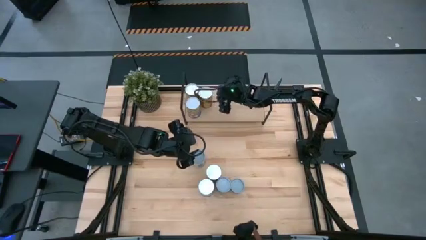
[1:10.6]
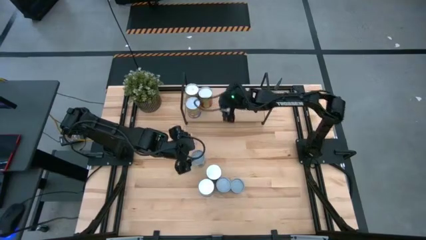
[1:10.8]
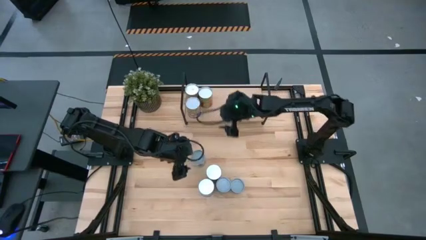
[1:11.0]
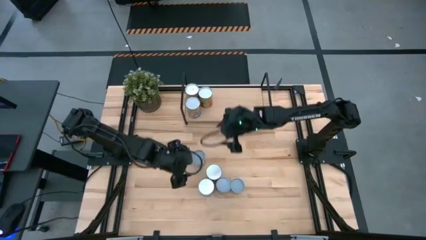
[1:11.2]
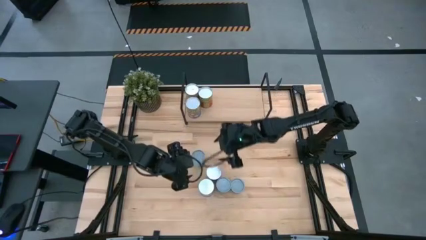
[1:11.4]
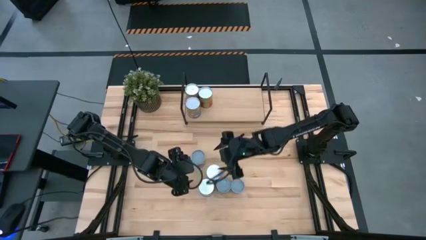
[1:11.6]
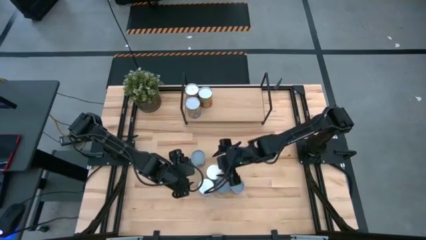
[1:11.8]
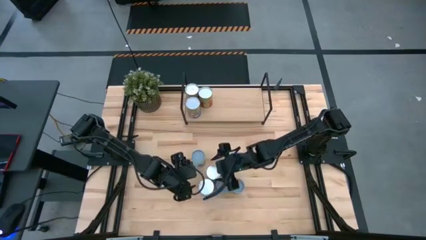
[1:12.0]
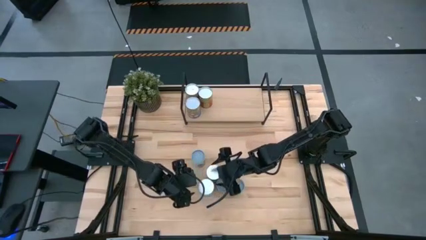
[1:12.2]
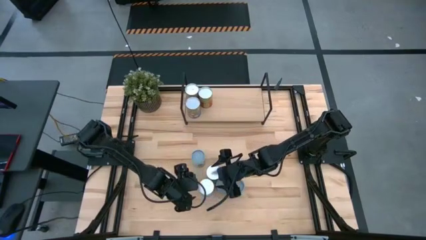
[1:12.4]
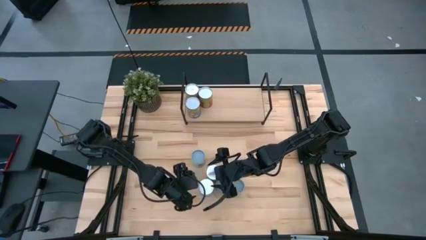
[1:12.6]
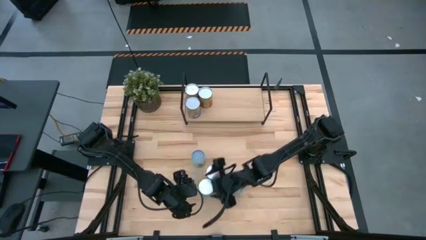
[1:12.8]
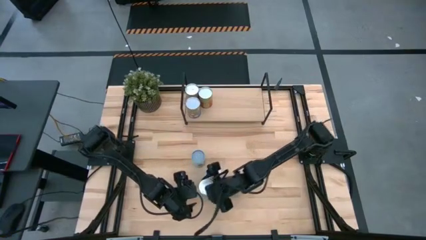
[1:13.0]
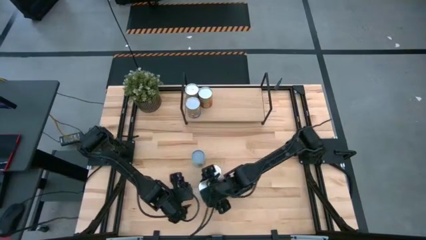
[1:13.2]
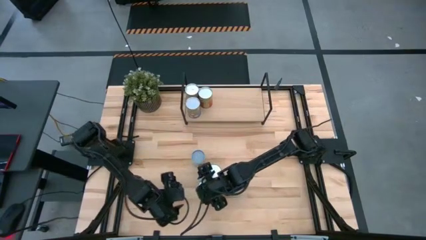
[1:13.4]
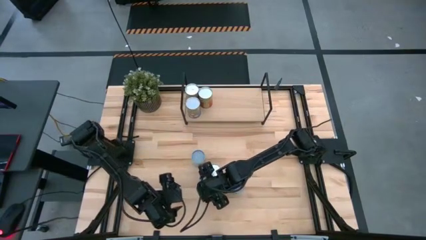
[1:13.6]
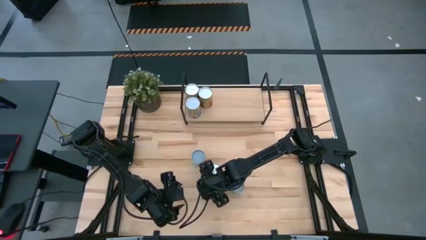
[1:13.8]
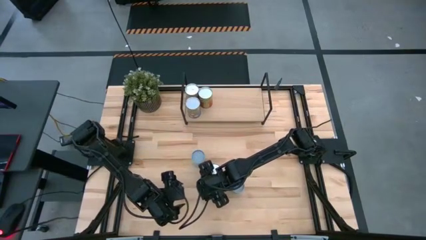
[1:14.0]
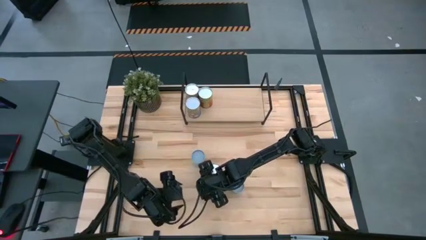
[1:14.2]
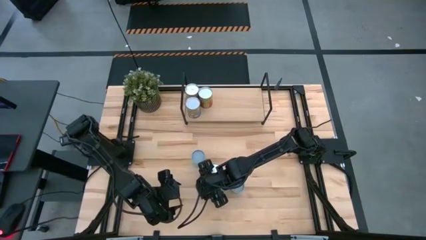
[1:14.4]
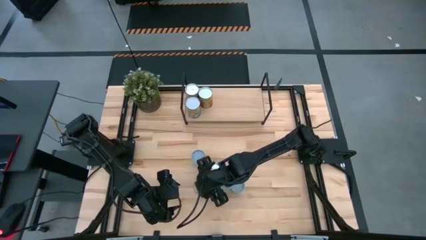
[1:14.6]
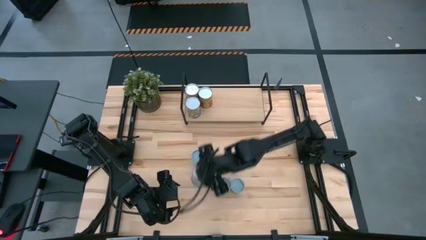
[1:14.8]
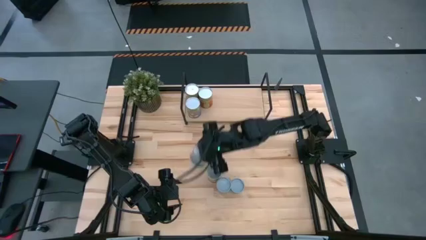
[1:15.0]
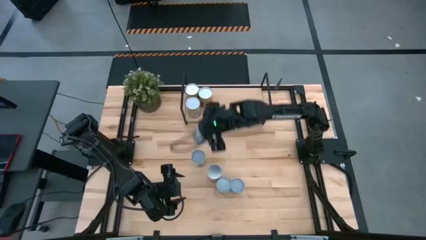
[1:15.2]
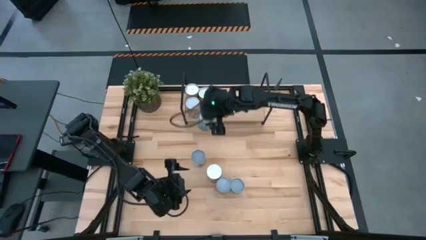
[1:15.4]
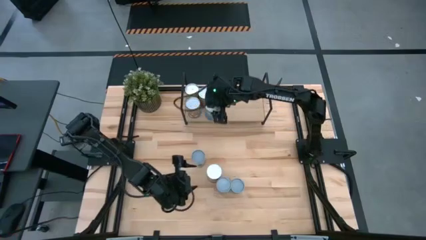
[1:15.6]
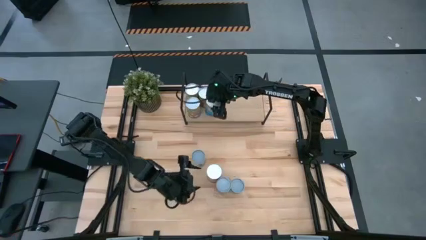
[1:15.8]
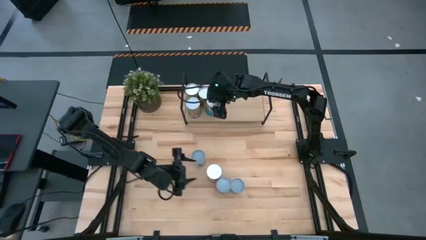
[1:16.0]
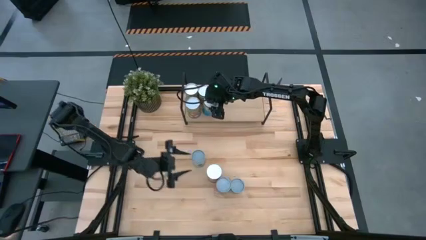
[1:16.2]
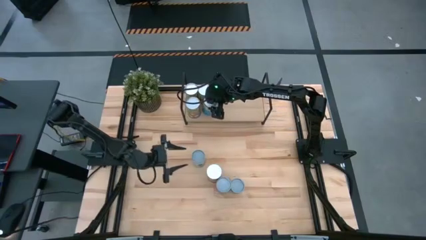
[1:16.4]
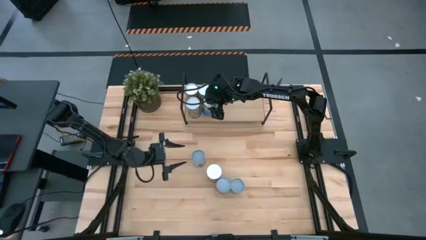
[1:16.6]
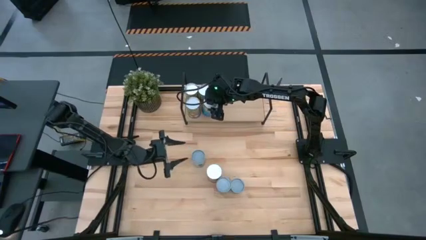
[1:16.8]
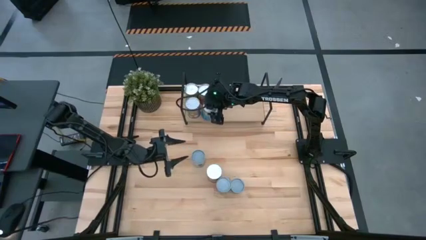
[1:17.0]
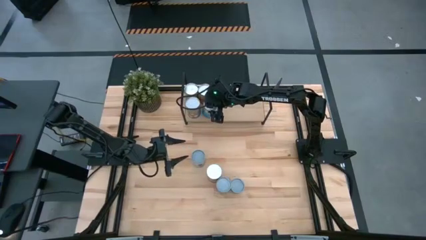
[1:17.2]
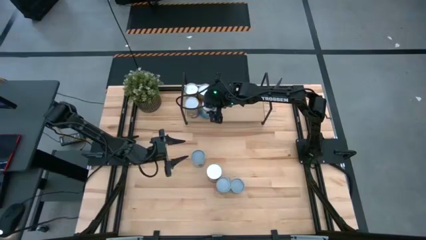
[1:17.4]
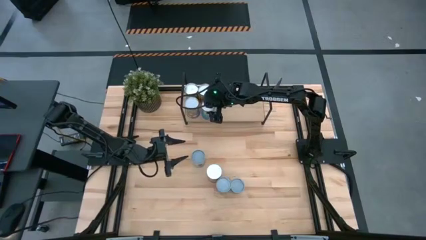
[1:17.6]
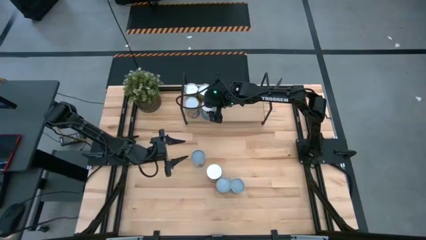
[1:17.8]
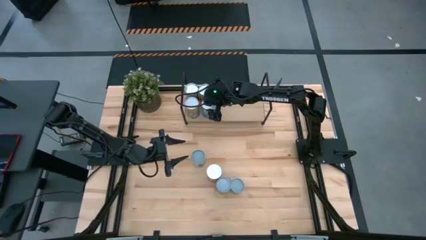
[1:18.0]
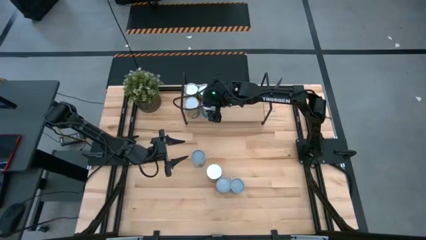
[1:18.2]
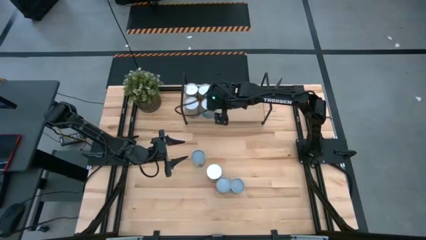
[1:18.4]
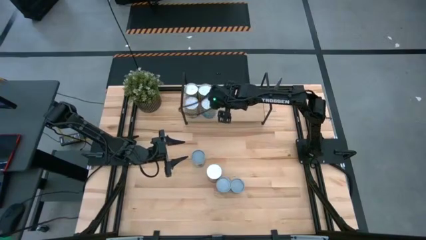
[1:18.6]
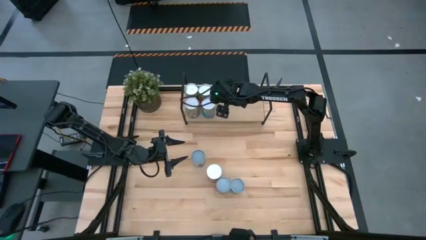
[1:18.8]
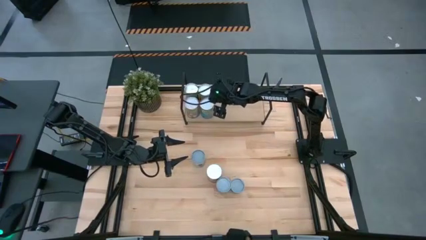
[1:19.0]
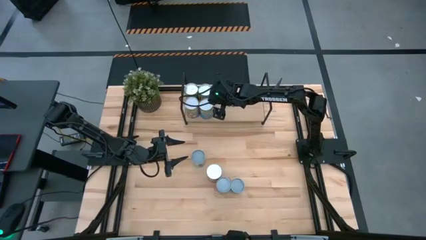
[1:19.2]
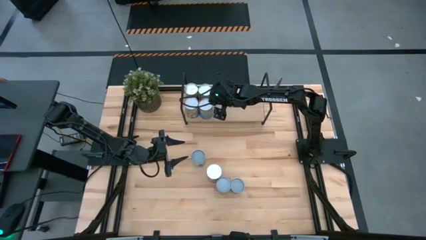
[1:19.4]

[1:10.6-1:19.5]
Task: Pick and place cans onto a shelf
Put the canned cherries on the shelf

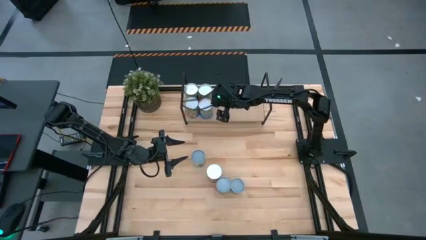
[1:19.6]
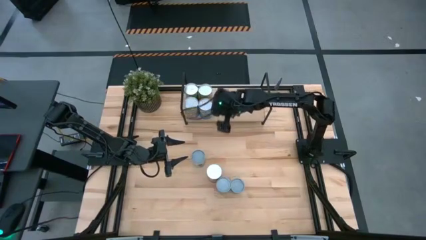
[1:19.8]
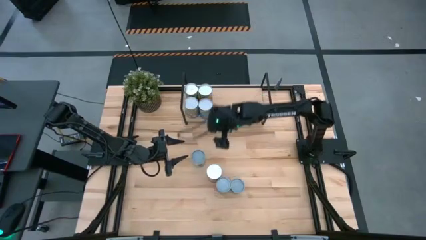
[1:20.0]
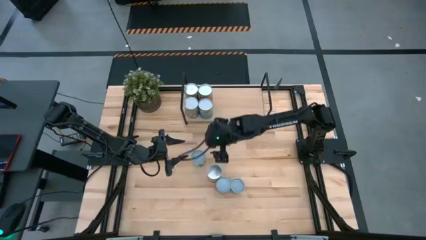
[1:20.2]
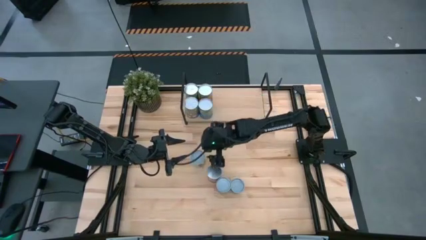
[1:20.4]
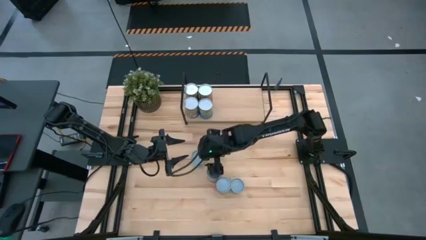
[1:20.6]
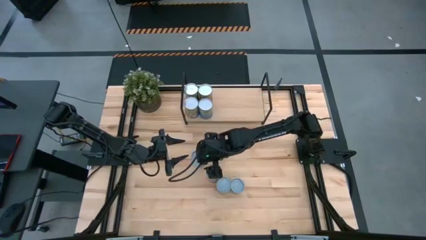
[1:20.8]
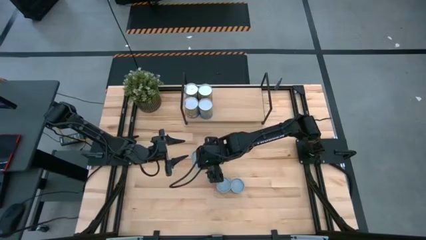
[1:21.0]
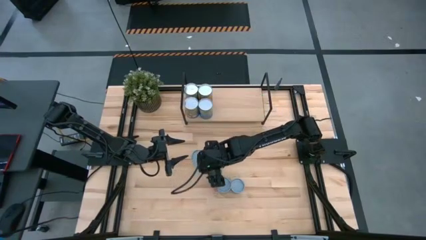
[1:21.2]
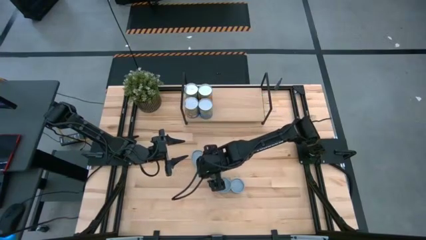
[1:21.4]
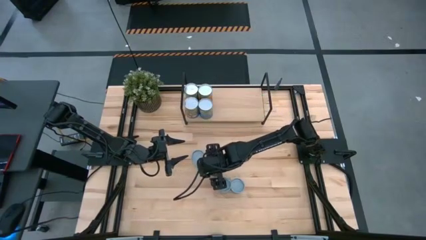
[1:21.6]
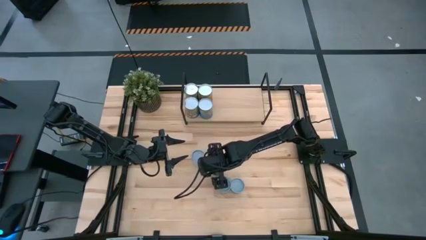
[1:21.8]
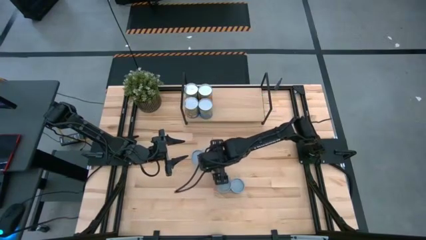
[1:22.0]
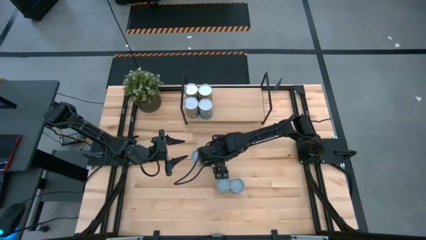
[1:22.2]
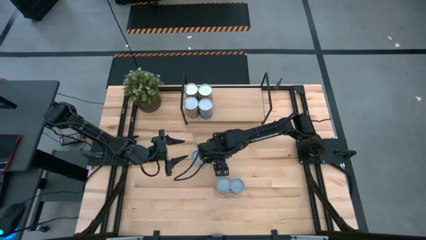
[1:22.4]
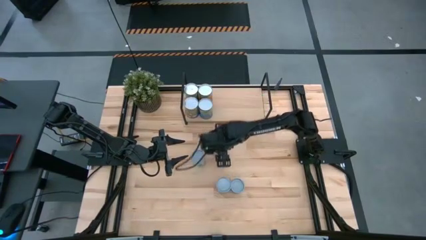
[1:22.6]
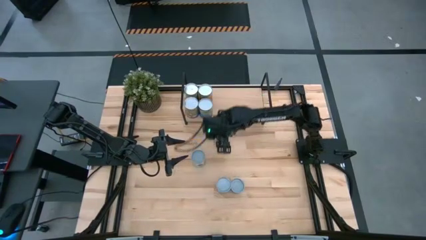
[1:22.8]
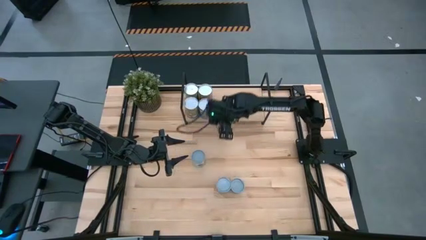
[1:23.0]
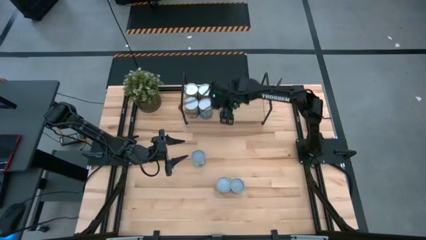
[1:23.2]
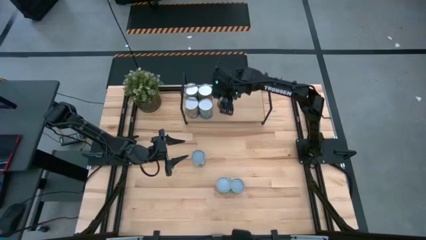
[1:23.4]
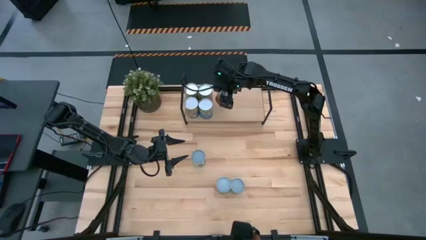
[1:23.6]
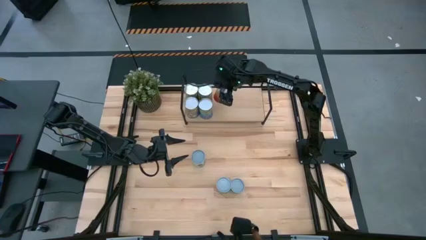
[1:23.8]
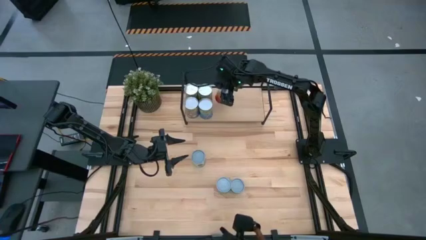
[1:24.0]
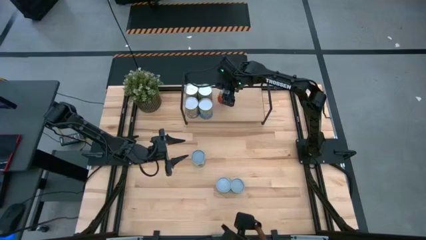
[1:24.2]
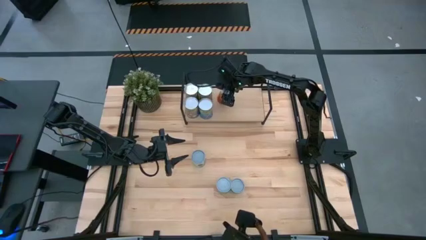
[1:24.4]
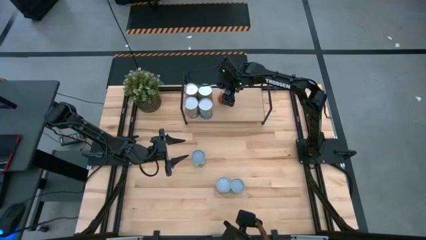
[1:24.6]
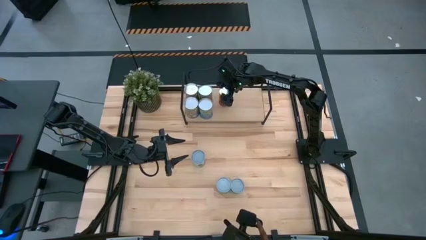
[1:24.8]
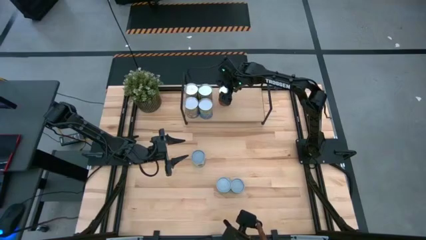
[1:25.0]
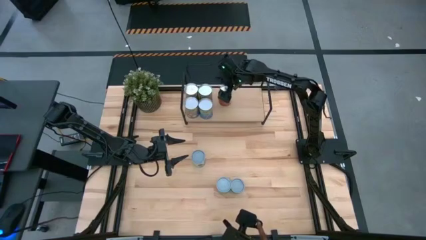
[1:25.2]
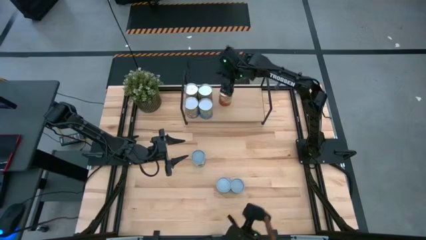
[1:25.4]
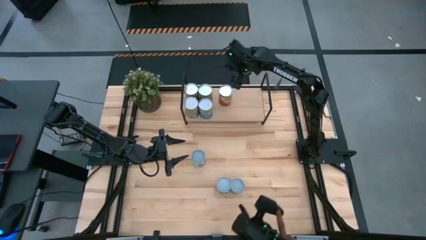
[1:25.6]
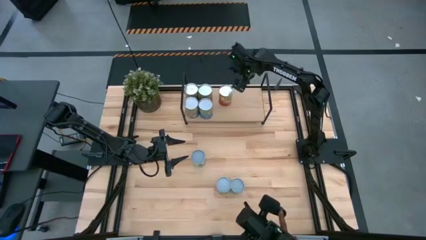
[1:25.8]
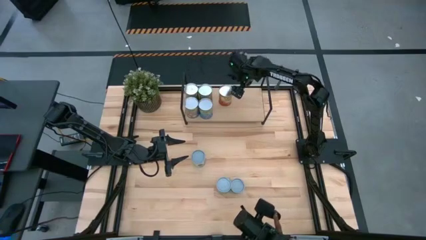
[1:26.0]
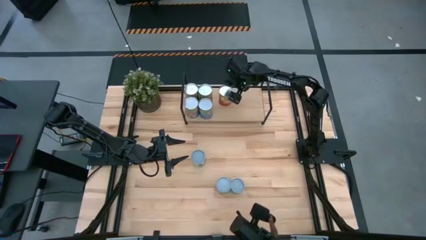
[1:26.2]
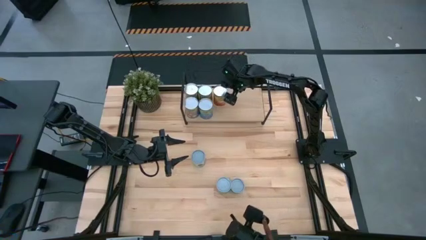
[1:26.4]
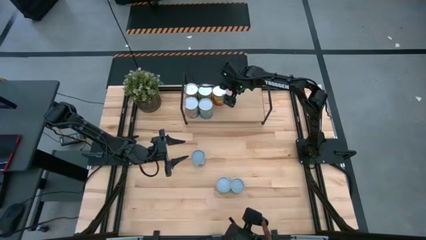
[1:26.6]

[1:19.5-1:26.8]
Put the canned corn on the shelf

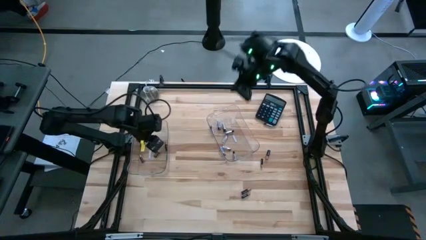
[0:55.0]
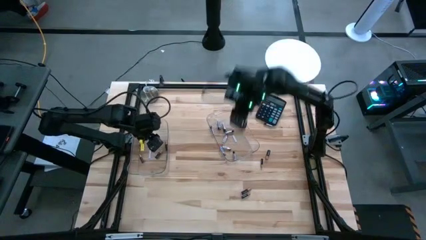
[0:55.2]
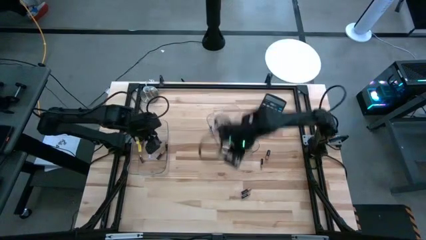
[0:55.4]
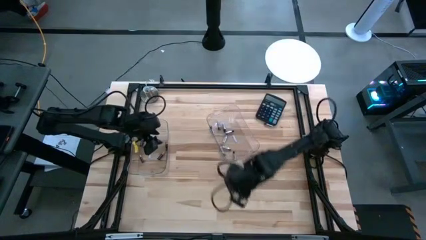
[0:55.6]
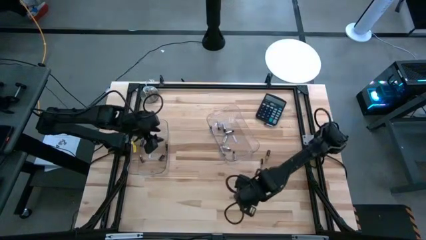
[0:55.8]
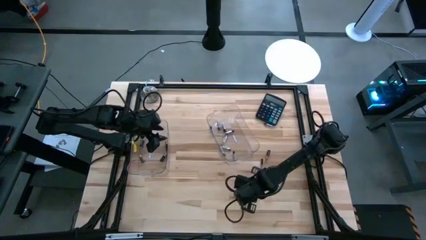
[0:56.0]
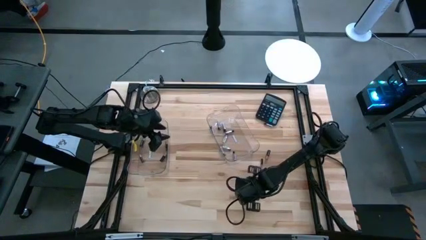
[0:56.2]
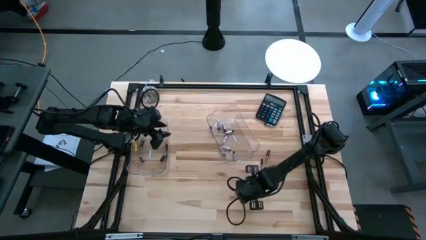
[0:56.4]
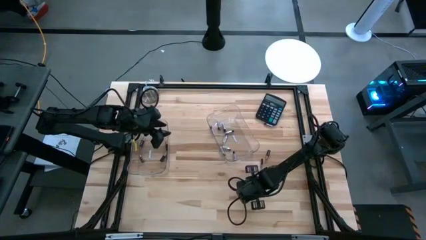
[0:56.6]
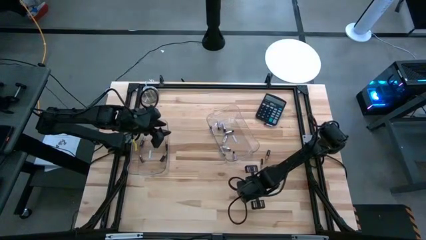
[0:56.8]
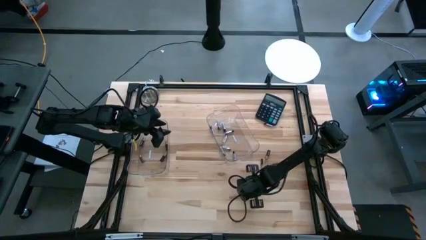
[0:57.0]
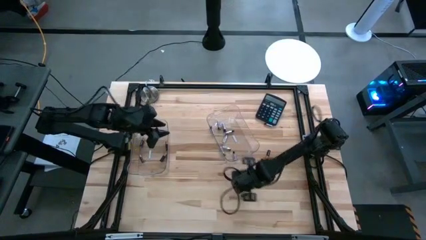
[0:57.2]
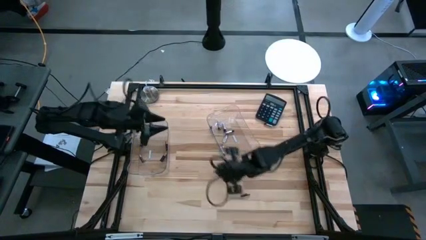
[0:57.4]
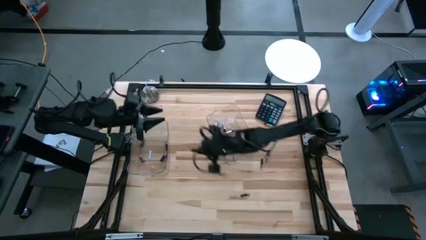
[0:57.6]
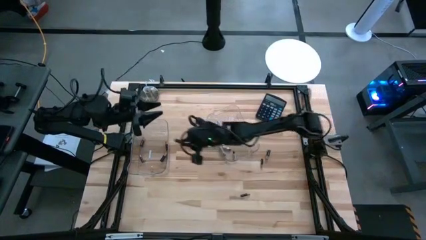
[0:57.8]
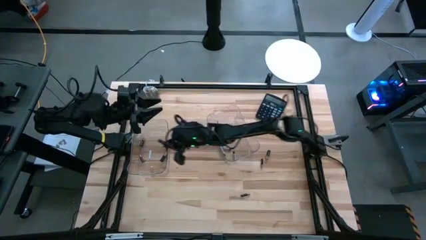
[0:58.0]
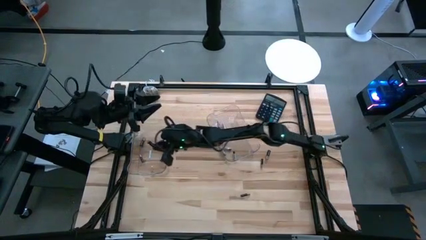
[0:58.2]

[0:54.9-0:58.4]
Task: Sort batteries
Put the black battery into the left transparent bin
